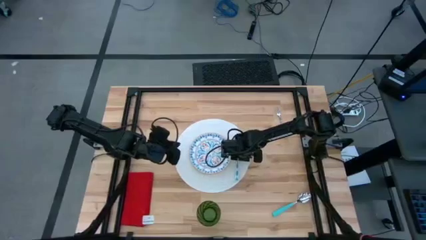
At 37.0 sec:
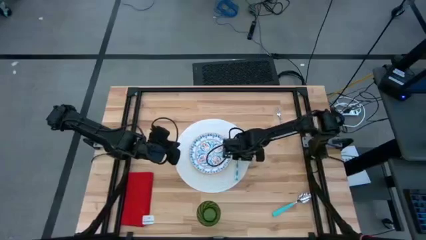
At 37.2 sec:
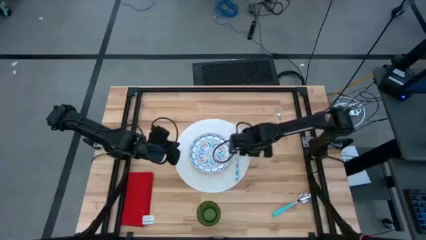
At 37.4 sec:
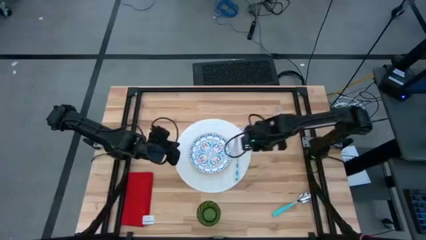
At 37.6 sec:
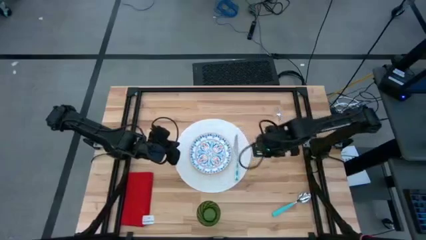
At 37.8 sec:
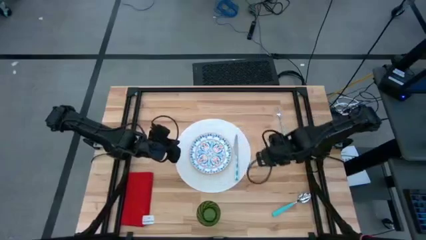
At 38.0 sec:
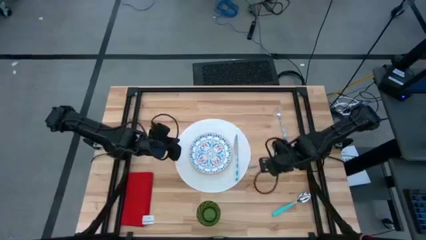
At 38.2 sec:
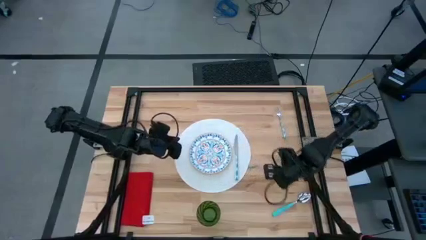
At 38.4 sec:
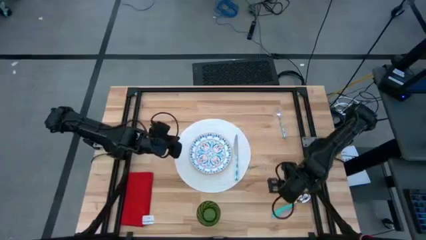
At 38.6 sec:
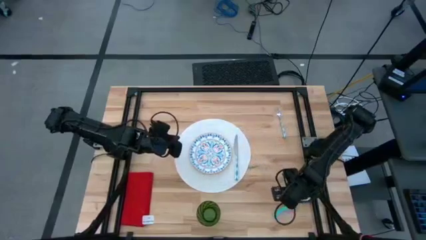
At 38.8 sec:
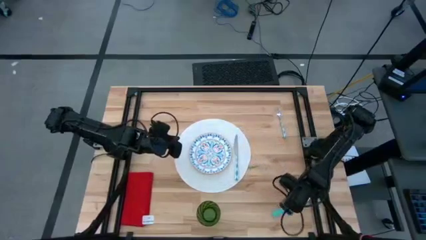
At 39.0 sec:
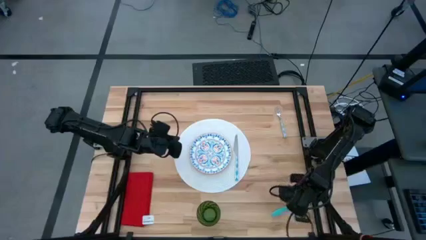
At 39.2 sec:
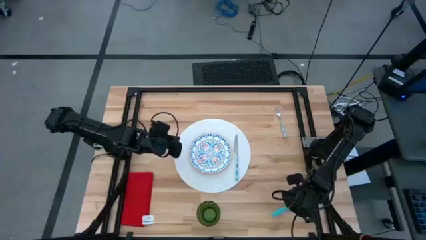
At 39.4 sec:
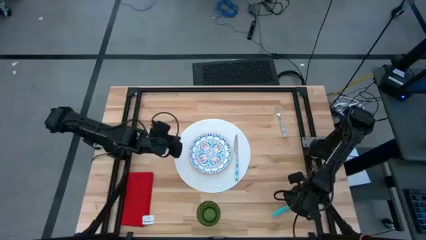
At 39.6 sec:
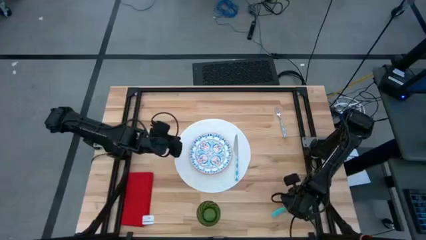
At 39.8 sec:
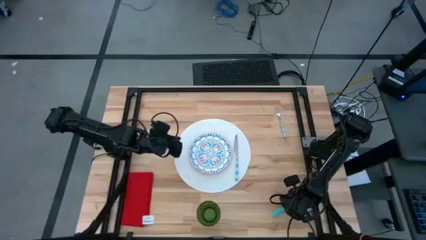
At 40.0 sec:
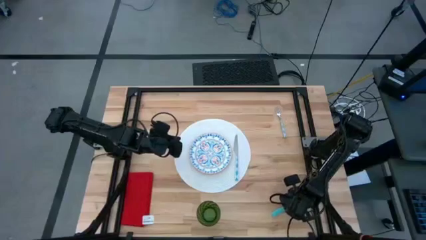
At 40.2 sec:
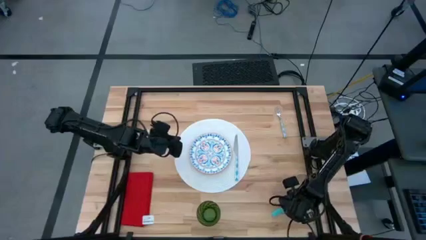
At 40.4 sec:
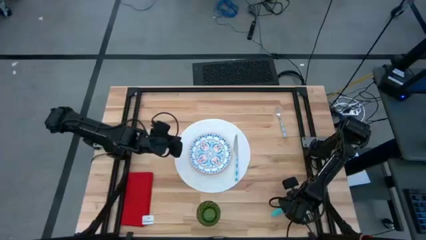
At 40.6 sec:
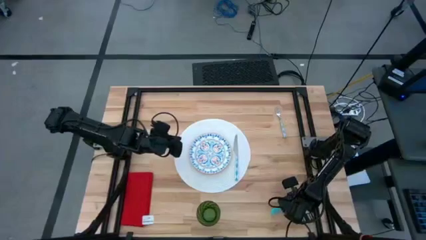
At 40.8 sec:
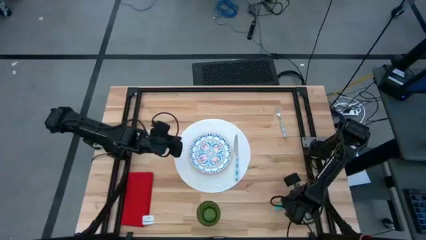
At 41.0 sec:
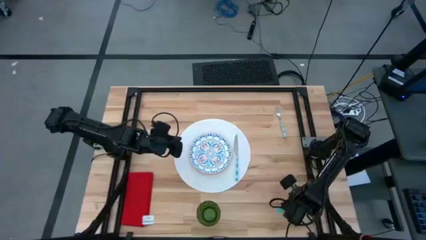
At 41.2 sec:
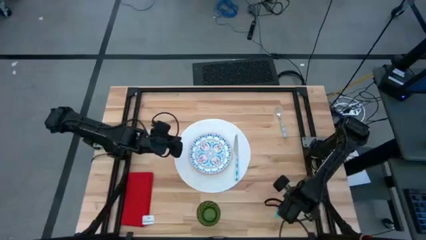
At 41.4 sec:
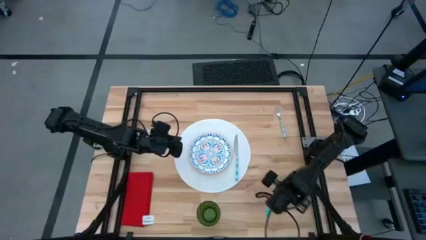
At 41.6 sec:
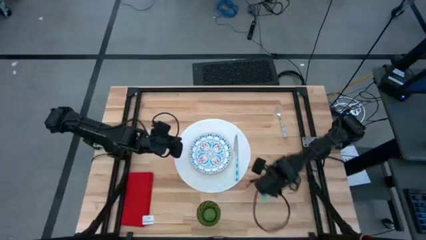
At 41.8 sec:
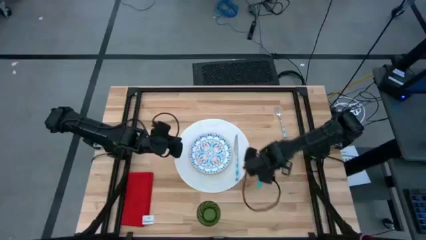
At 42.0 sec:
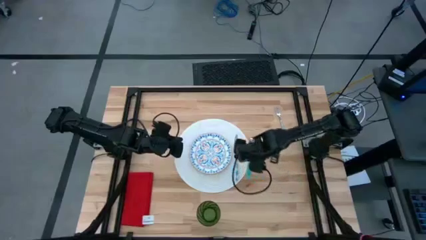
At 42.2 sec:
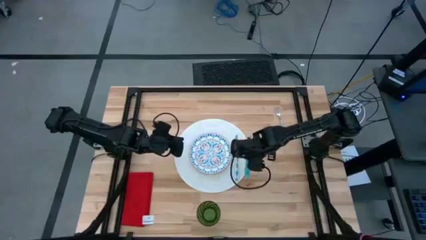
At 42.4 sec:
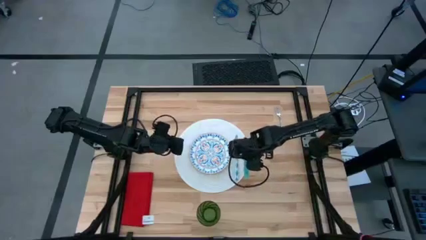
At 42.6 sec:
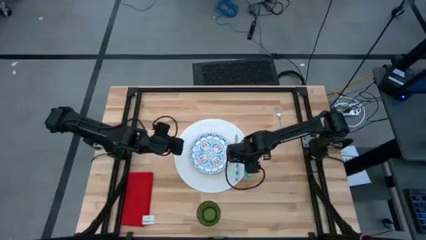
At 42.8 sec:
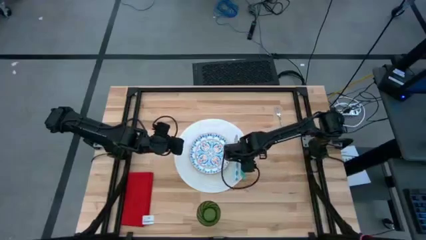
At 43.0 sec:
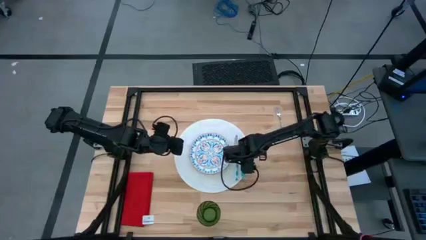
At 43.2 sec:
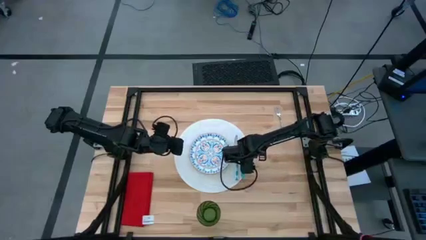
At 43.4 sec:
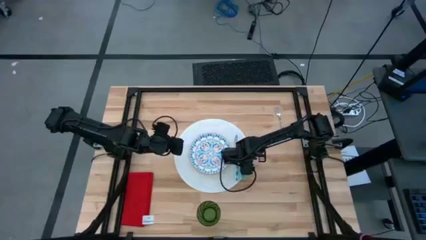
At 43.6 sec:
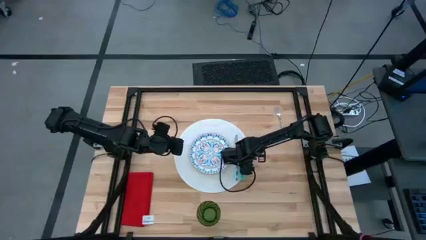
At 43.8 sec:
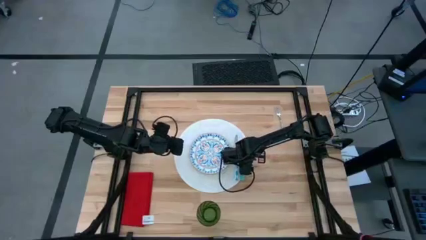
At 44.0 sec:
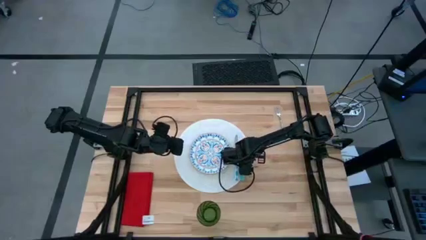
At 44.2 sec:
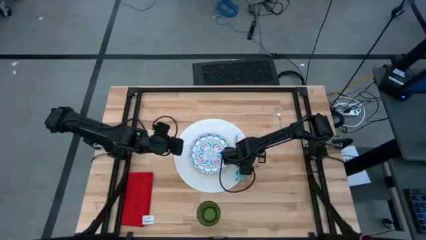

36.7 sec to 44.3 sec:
Task: Set table place
Put the light blue spoon to the right side of the white table knife on the white tablemat

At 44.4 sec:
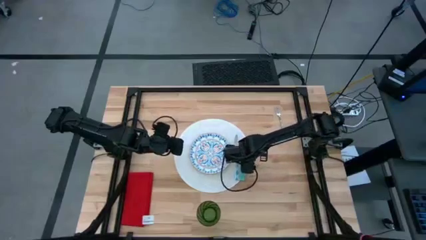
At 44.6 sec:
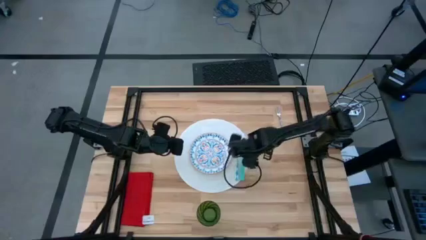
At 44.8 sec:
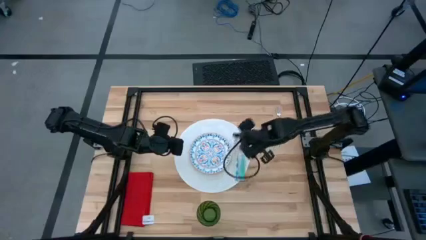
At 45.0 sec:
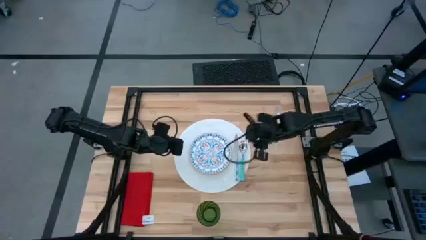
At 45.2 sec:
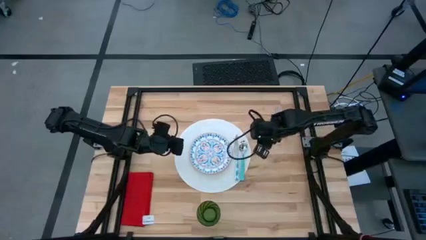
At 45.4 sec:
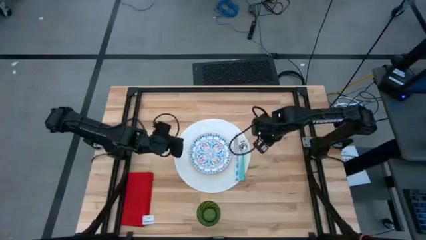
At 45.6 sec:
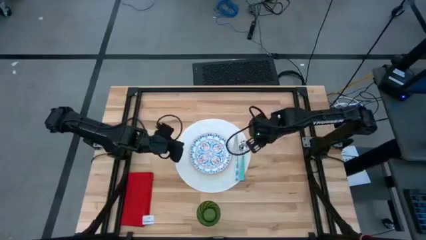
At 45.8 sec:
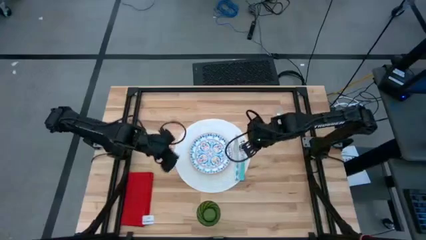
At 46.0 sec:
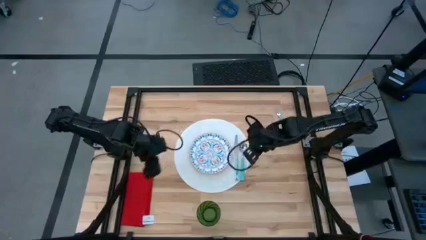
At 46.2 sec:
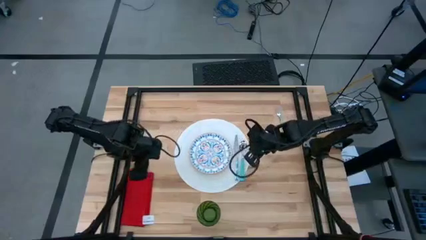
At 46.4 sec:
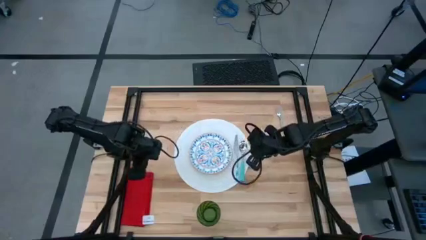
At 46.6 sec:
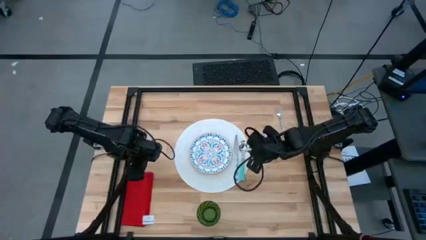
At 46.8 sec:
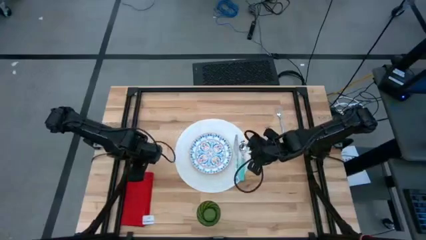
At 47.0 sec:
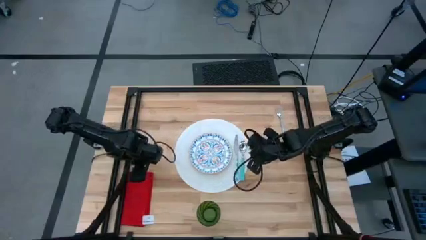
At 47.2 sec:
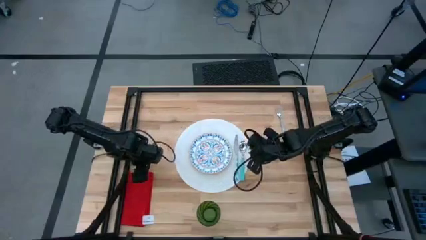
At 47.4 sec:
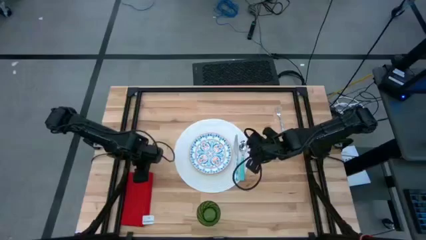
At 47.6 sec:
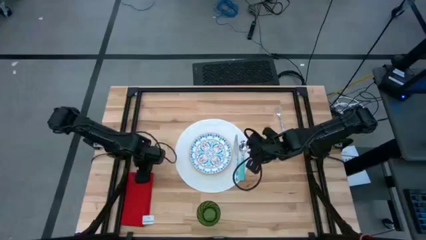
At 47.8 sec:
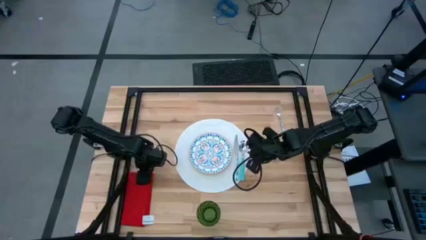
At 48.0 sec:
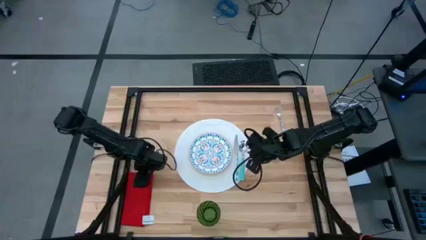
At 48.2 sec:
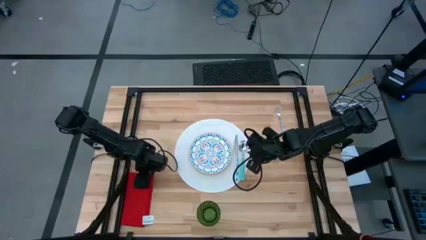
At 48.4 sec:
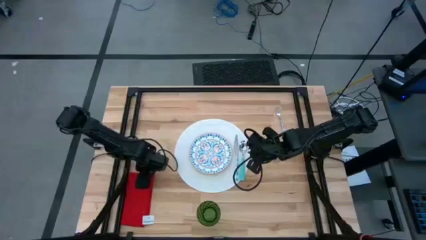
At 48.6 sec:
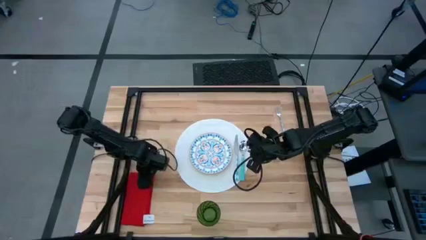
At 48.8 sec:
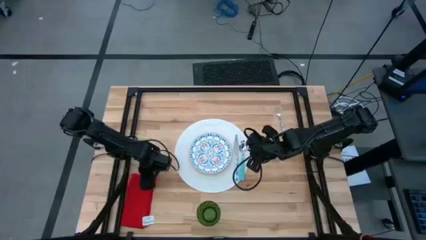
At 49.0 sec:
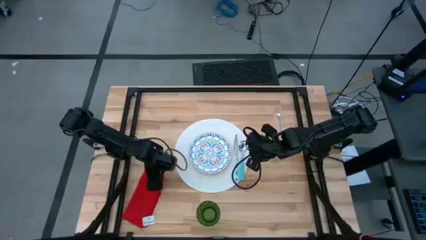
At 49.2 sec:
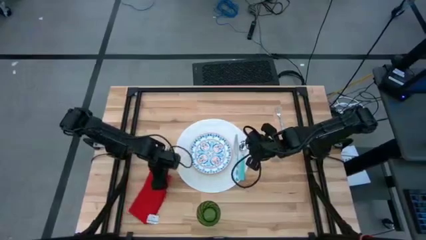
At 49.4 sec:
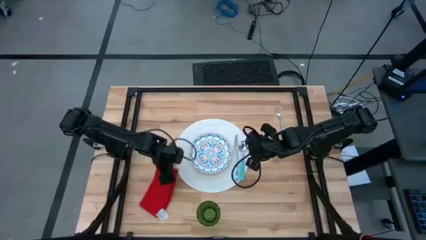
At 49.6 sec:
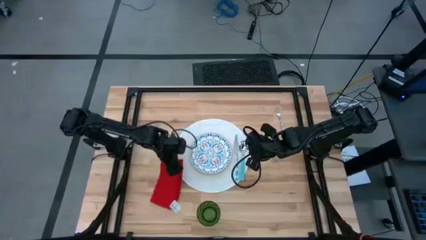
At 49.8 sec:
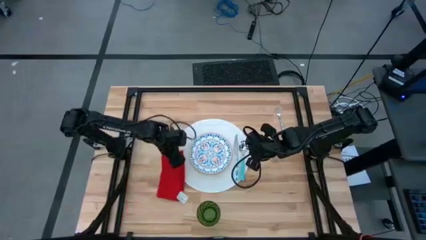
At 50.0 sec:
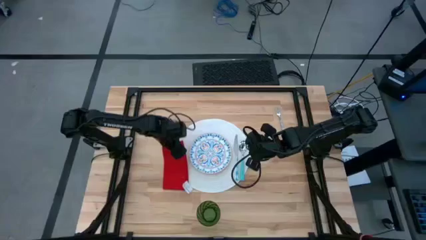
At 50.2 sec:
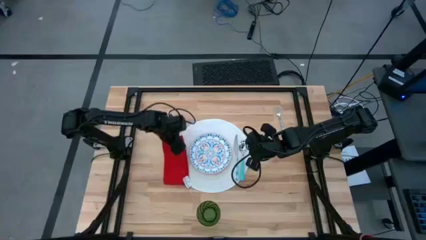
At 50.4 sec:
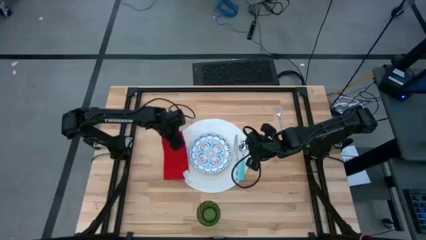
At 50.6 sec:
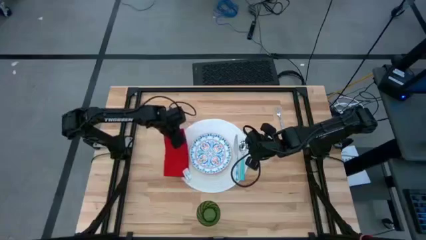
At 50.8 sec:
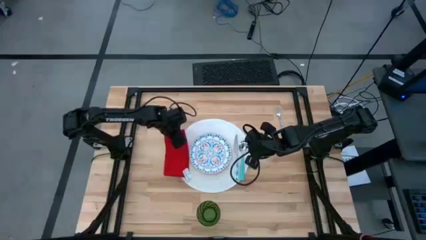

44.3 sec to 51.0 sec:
Put the red table napkin to the left side of the blue patterned plate on the white tablemat
